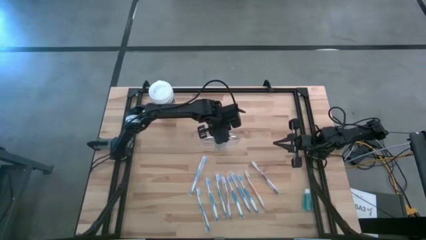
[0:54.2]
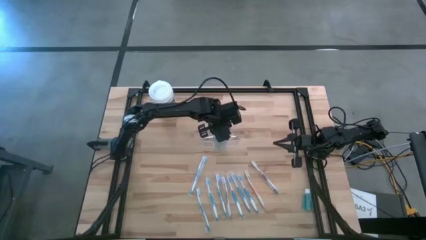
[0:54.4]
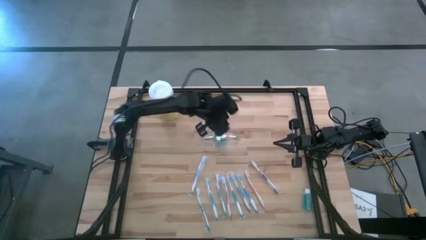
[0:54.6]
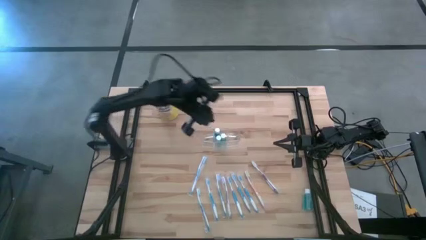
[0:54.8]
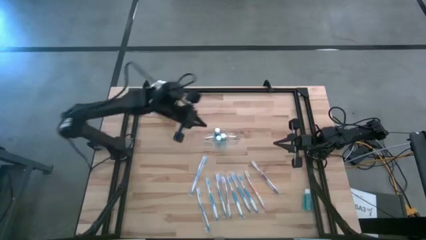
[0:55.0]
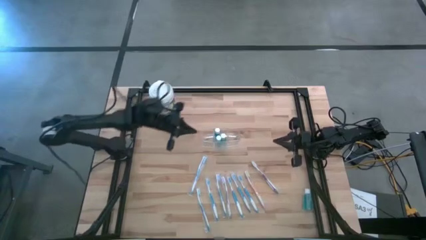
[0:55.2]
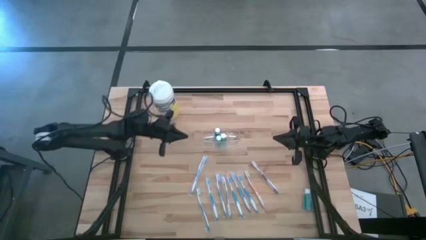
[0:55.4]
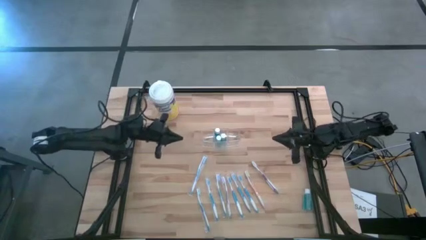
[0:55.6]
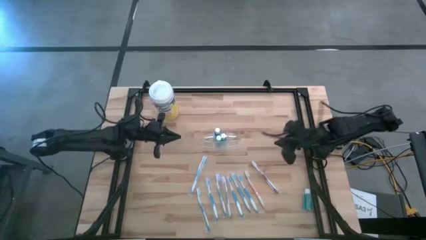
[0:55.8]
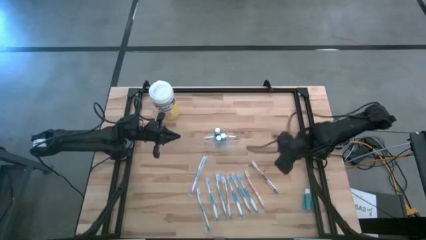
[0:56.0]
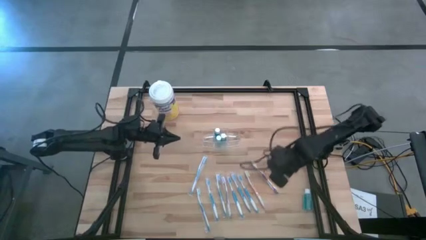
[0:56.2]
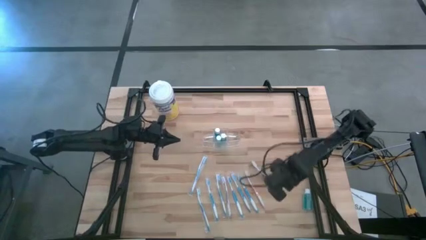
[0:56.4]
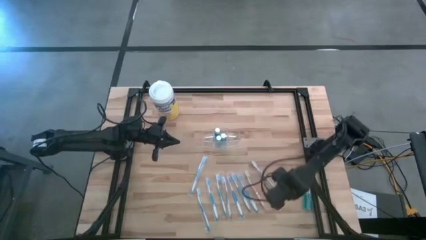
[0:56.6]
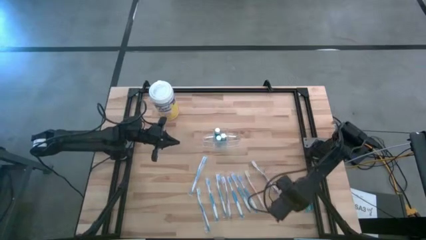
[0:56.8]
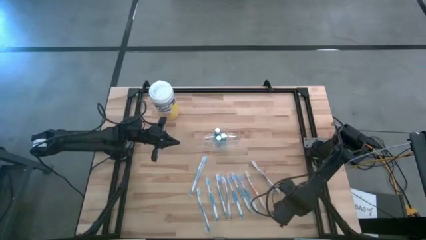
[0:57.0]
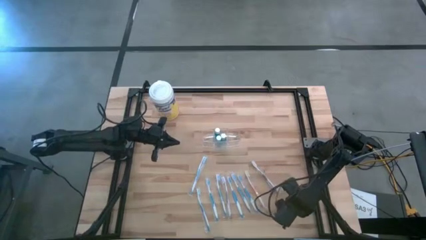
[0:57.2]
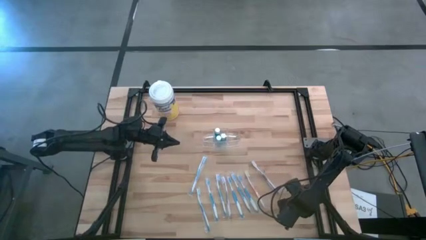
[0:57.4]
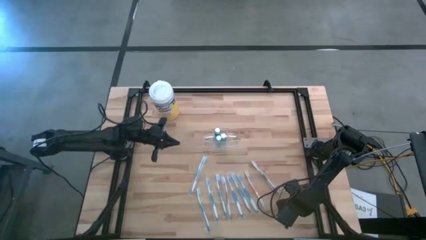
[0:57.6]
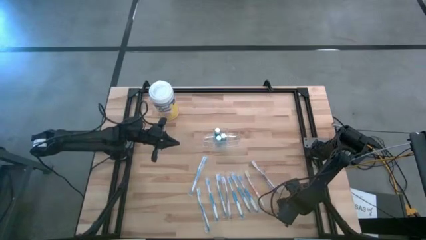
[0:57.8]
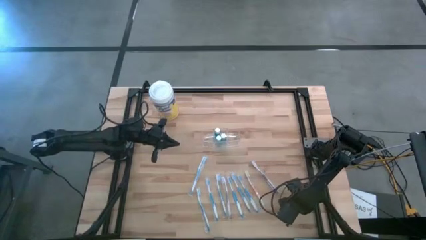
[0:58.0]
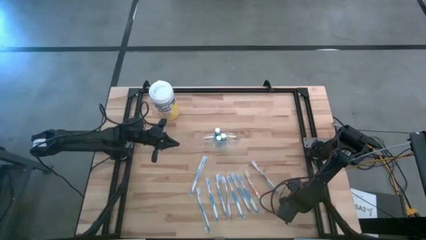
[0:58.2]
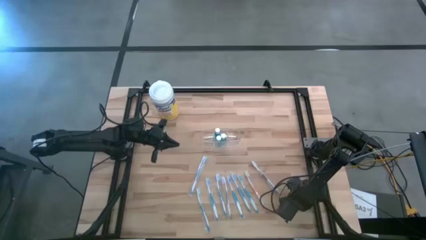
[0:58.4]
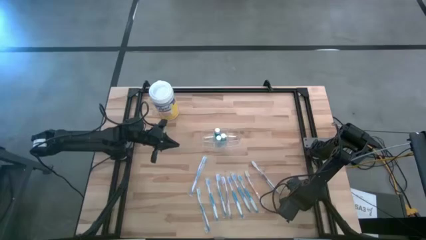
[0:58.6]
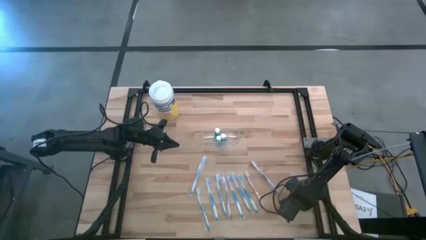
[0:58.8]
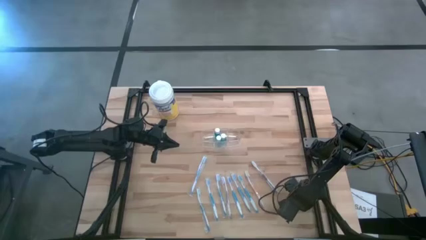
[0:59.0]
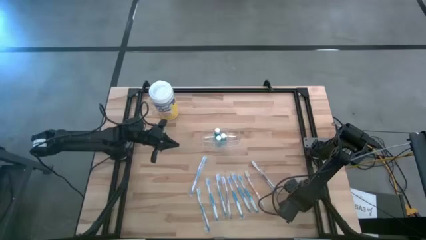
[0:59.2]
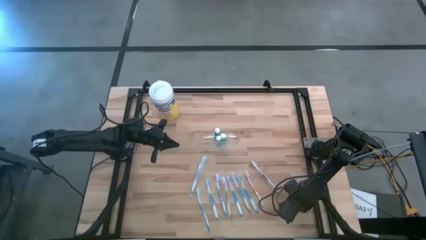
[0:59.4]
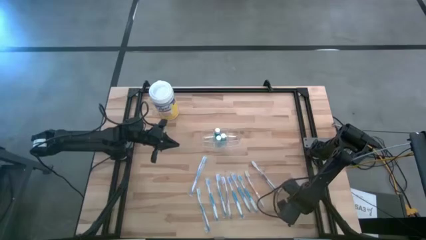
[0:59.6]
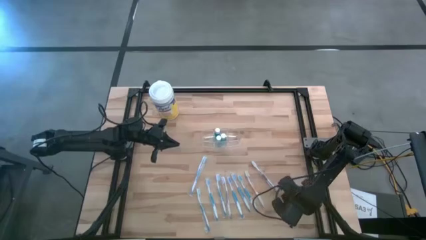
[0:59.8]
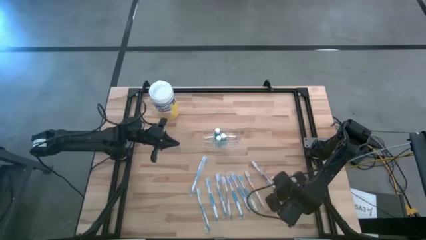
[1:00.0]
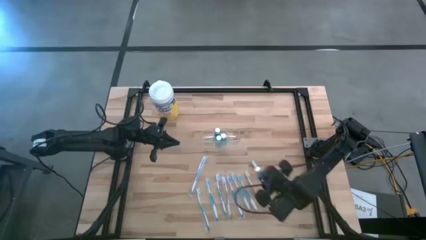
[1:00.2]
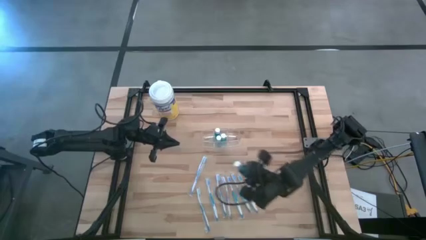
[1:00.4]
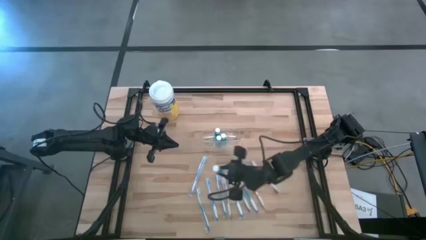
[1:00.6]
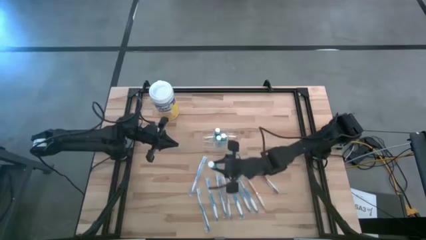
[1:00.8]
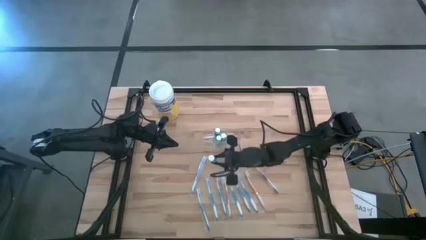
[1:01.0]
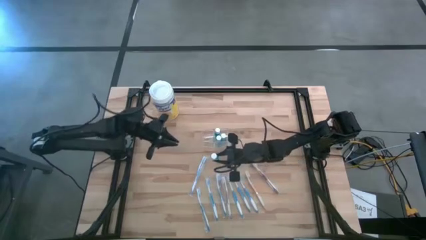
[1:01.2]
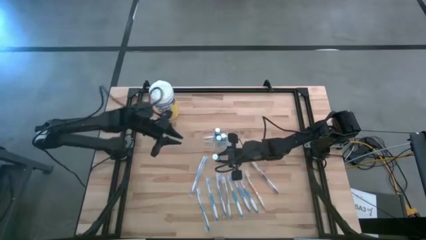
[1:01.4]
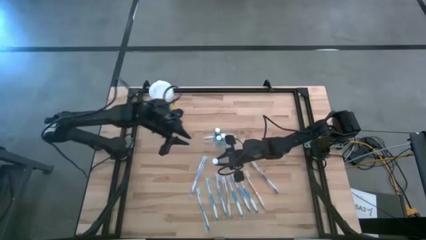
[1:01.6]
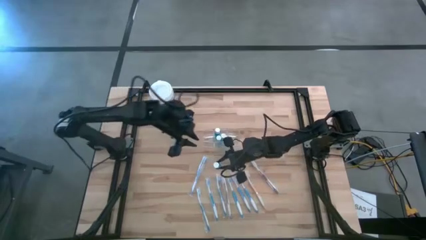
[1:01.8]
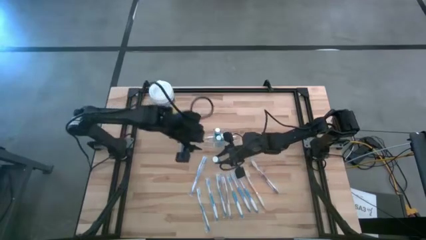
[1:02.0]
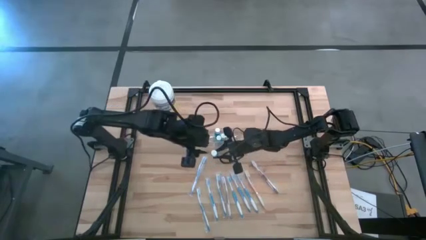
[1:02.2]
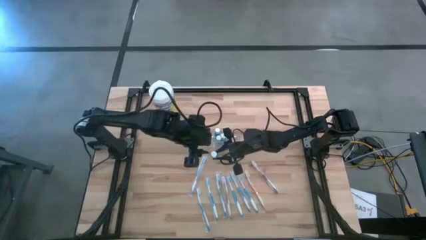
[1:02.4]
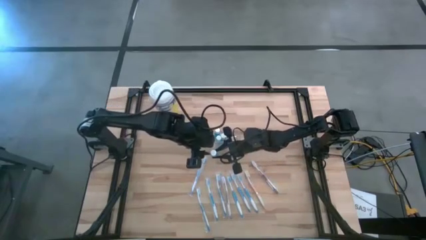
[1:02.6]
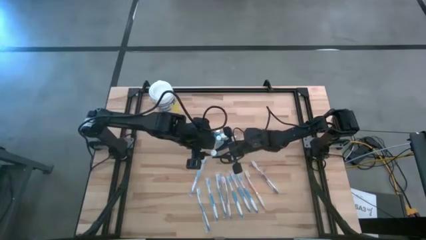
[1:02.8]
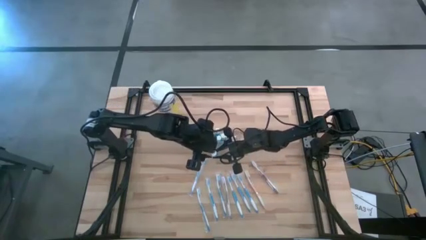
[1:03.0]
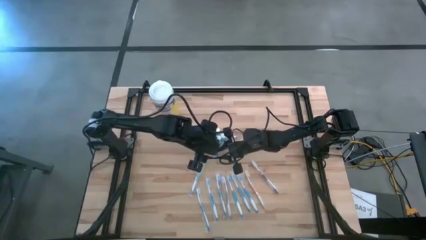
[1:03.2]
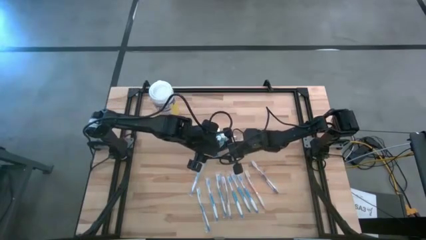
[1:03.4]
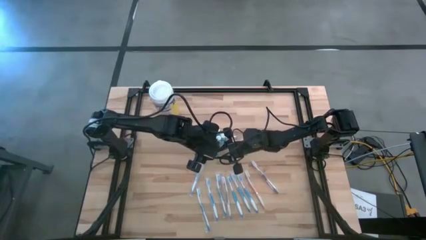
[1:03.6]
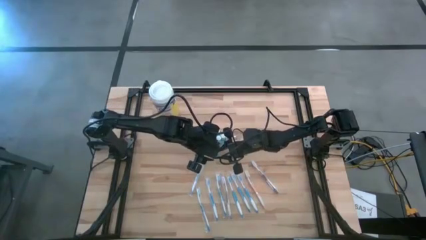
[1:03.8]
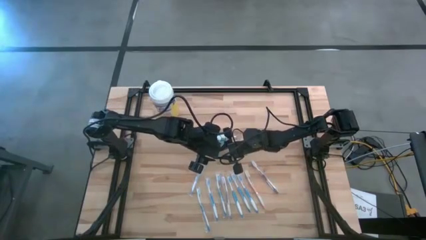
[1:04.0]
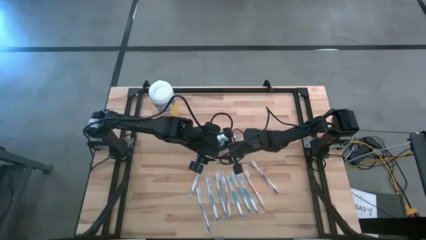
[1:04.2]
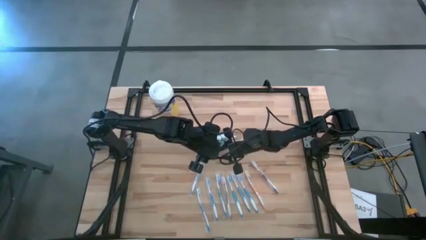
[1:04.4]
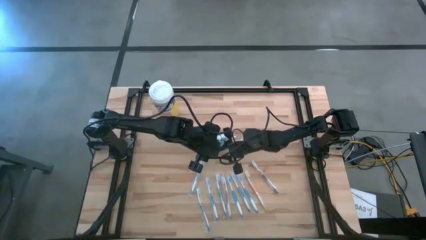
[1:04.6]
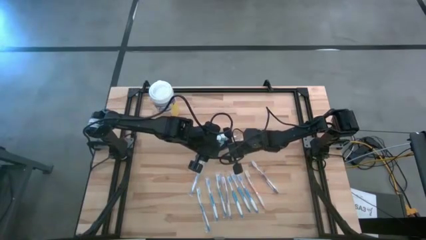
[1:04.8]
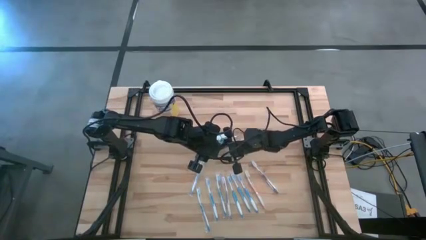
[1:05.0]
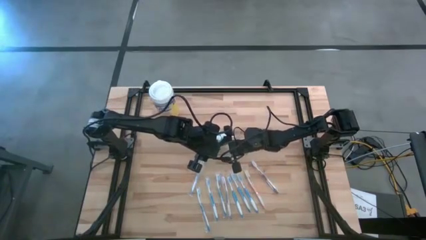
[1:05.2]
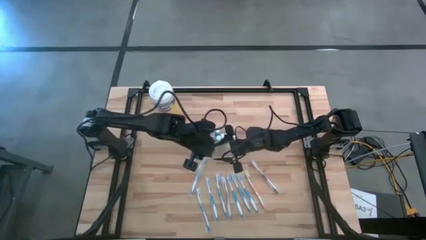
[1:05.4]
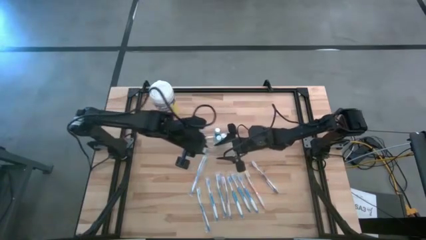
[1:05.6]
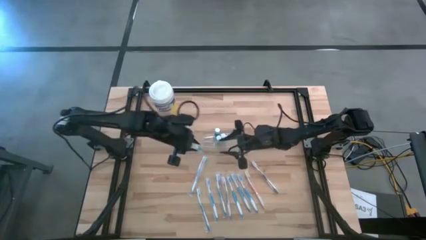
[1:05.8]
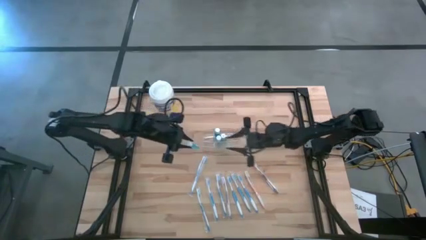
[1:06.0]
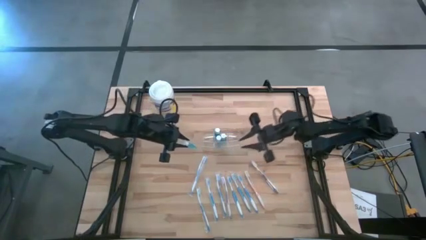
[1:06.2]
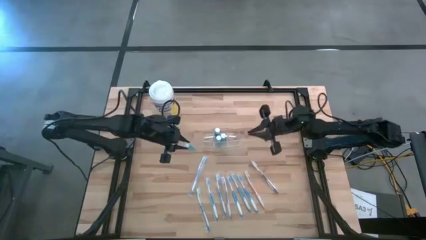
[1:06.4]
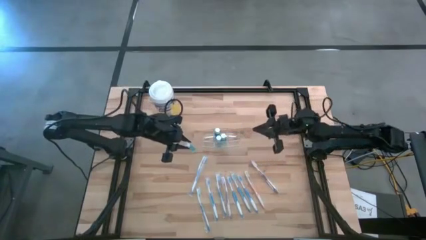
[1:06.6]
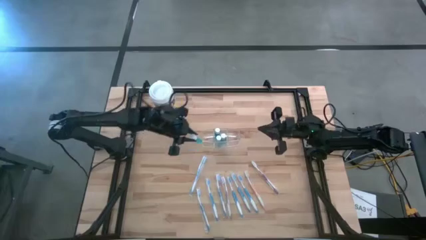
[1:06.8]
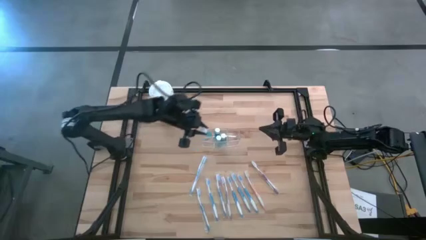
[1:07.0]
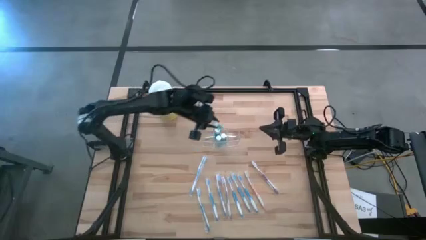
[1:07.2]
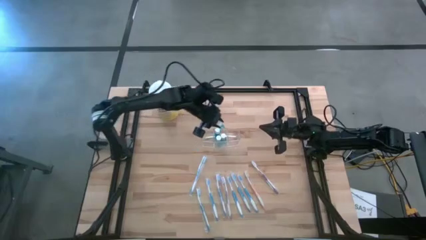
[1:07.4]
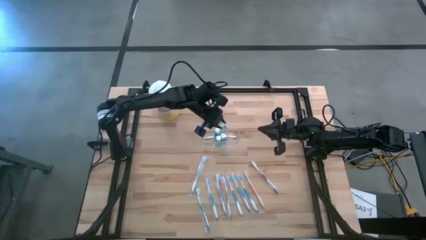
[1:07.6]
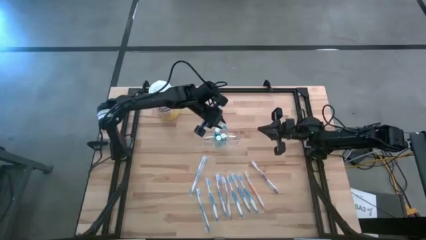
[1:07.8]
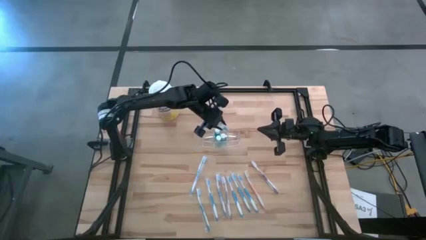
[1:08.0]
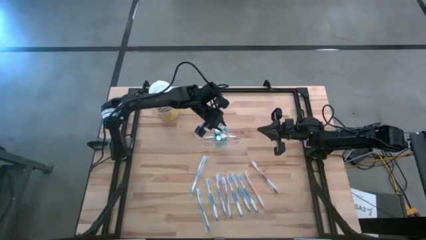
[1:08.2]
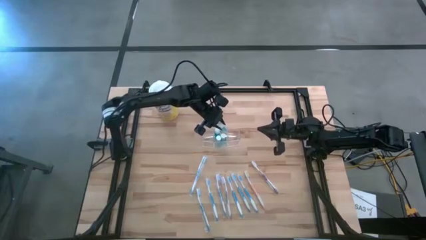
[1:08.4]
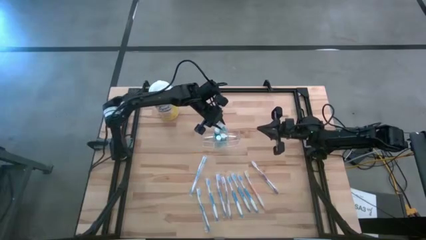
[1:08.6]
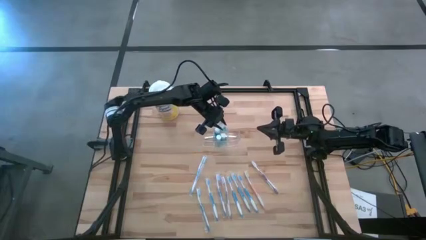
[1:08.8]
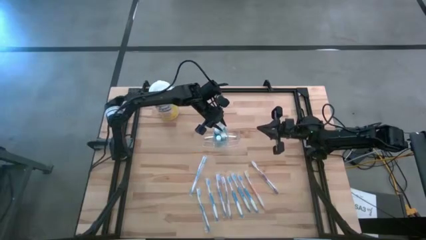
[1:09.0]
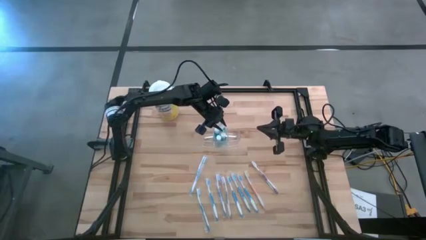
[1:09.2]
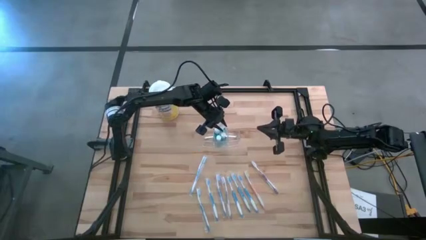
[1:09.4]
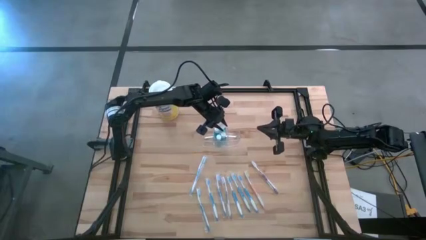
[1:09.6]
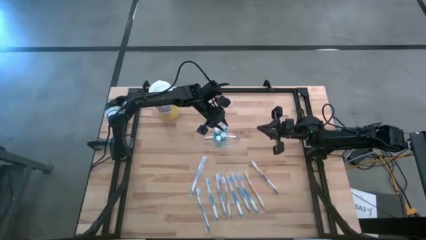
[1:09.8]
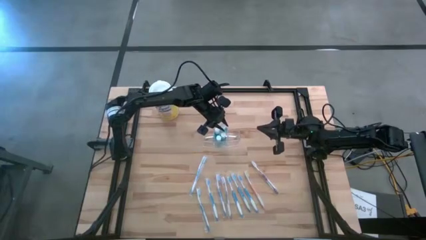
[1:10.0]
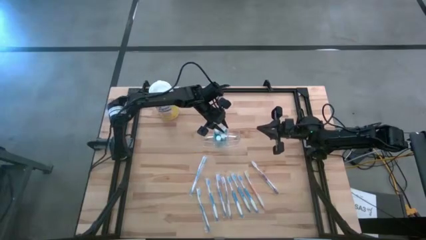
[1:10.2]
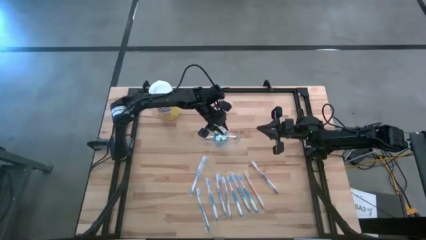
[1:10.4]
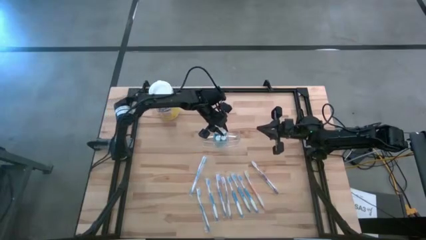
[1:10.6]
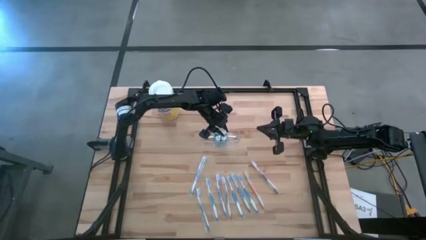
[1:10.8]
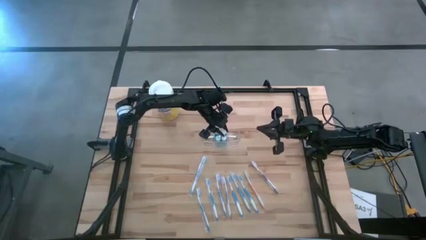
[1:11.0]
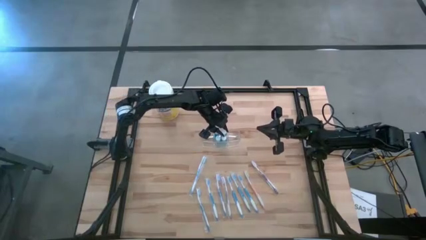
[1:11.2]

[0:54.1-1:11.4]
Task: Pick & Place toothbrushing station
Put the blue mouthwash bottle into the middle section of the transparent organizer
